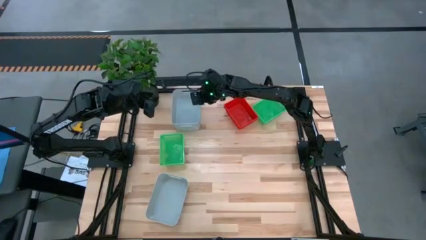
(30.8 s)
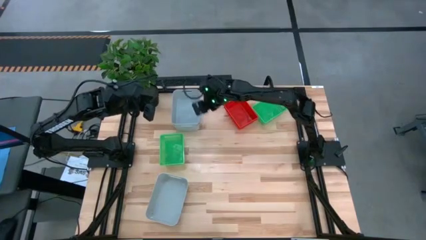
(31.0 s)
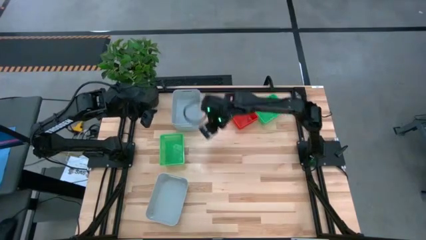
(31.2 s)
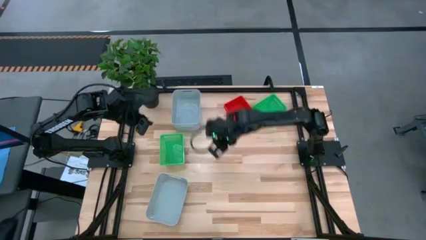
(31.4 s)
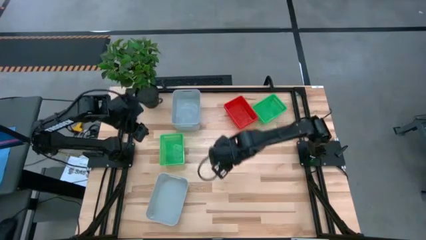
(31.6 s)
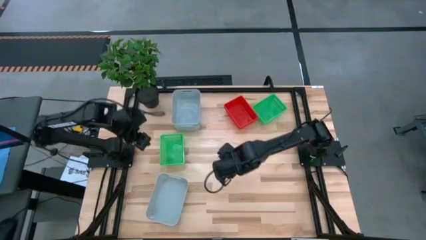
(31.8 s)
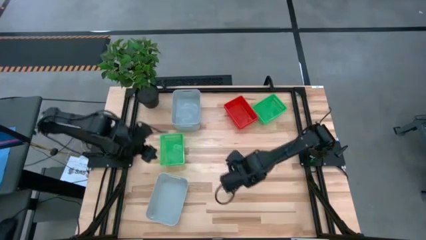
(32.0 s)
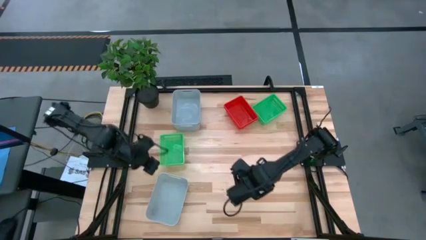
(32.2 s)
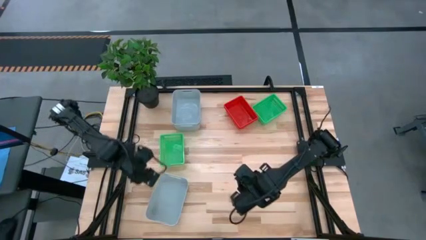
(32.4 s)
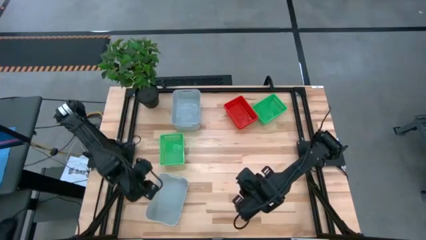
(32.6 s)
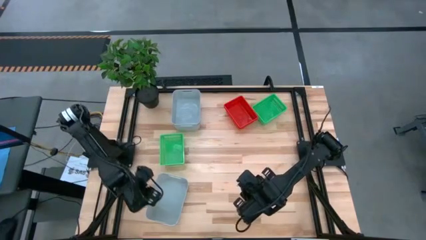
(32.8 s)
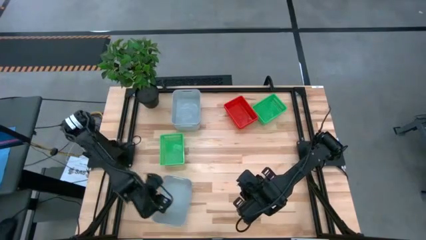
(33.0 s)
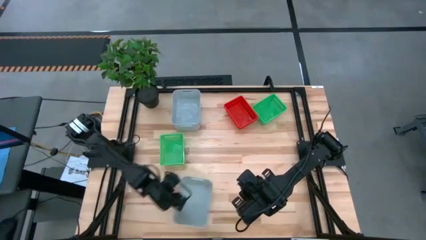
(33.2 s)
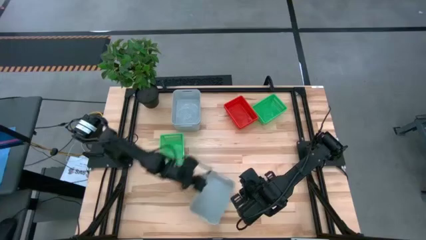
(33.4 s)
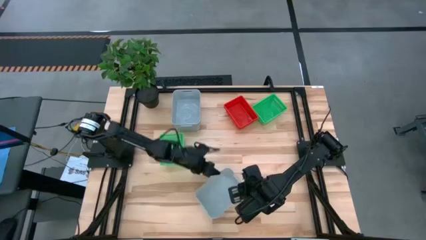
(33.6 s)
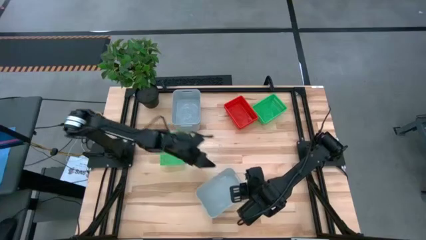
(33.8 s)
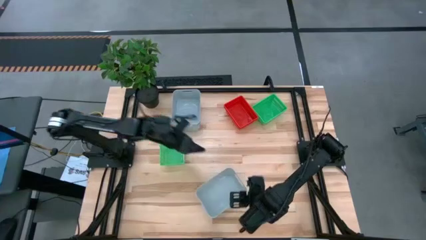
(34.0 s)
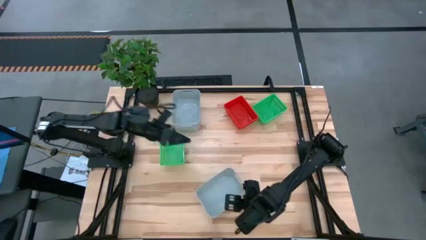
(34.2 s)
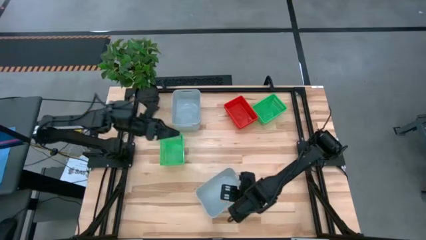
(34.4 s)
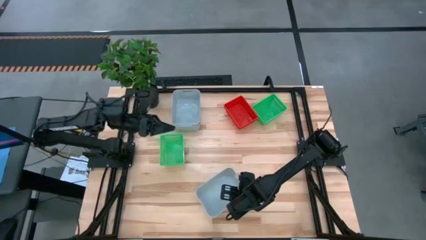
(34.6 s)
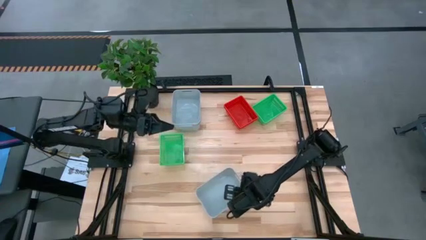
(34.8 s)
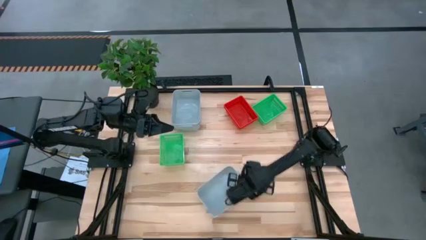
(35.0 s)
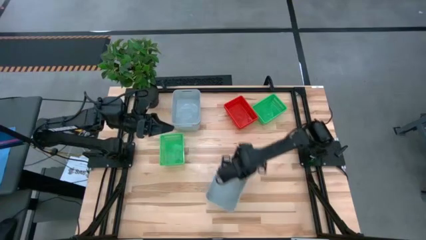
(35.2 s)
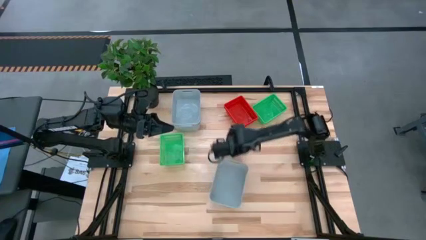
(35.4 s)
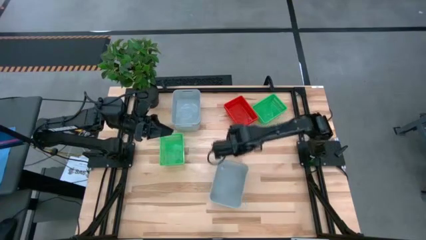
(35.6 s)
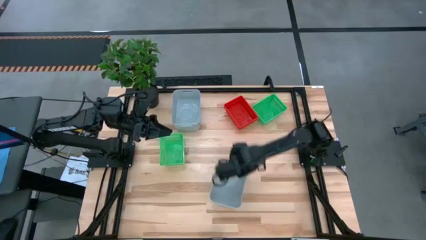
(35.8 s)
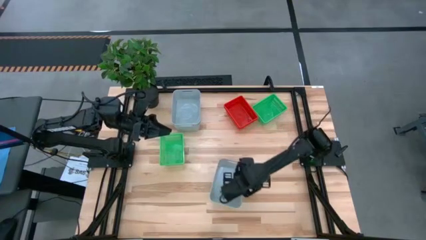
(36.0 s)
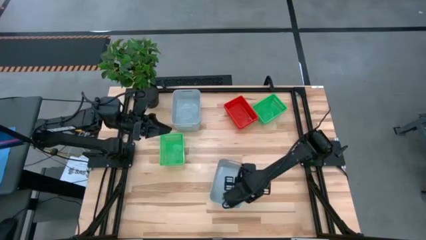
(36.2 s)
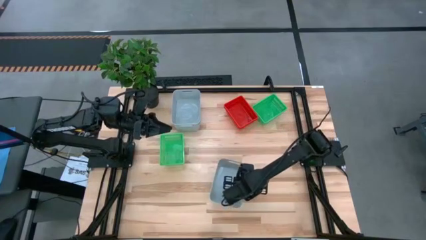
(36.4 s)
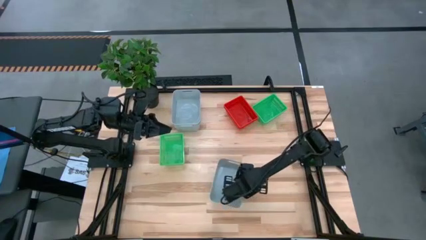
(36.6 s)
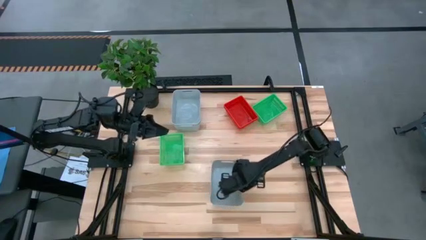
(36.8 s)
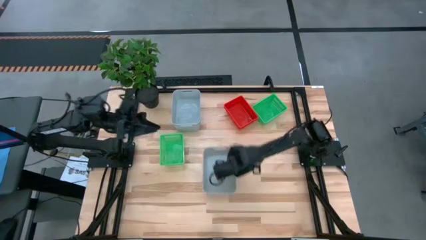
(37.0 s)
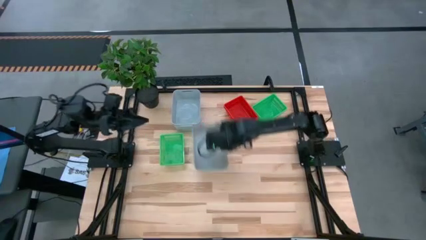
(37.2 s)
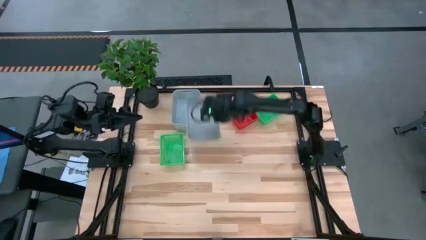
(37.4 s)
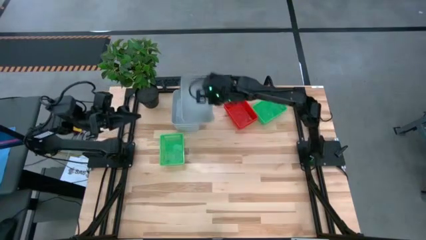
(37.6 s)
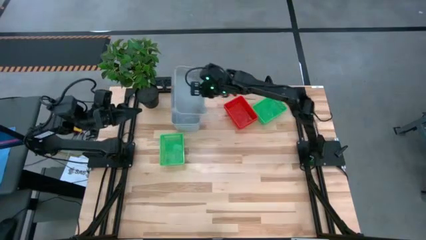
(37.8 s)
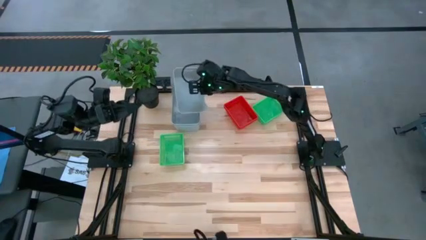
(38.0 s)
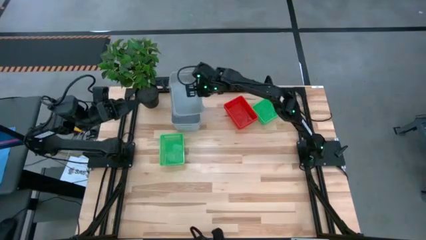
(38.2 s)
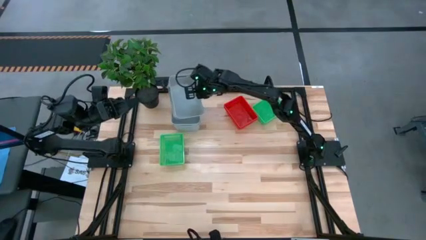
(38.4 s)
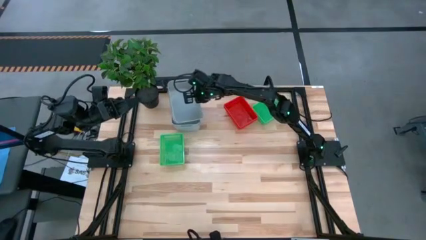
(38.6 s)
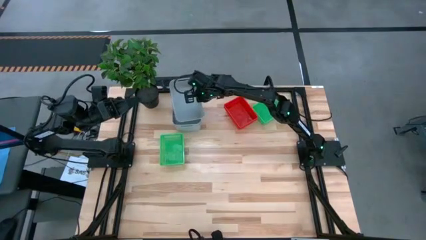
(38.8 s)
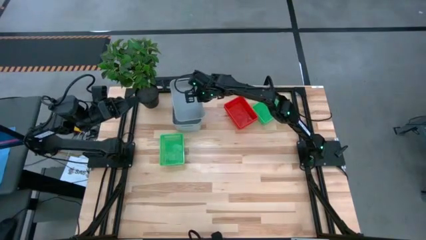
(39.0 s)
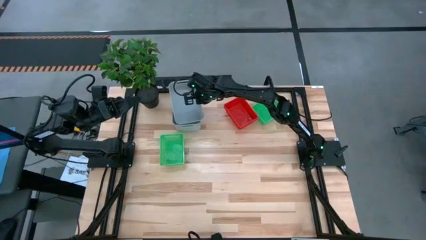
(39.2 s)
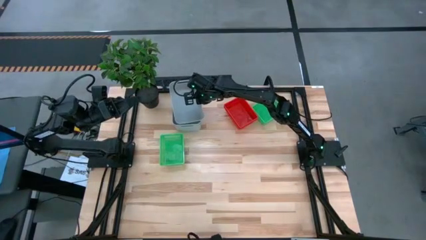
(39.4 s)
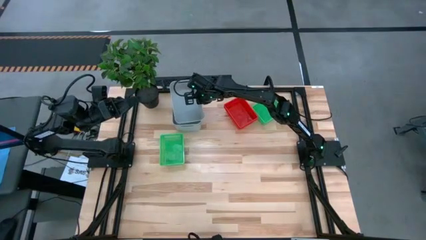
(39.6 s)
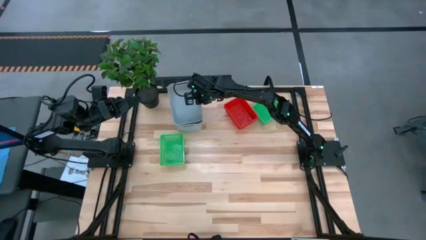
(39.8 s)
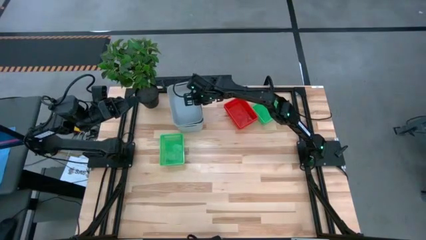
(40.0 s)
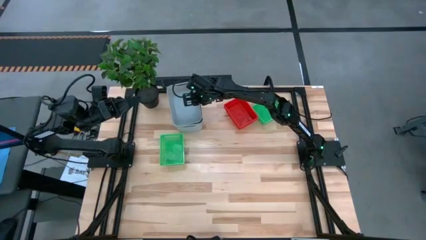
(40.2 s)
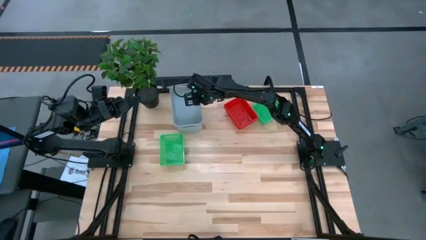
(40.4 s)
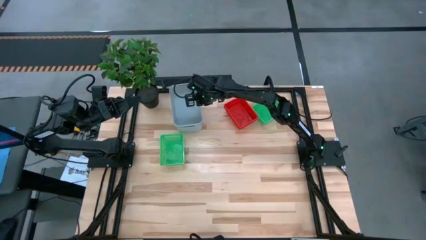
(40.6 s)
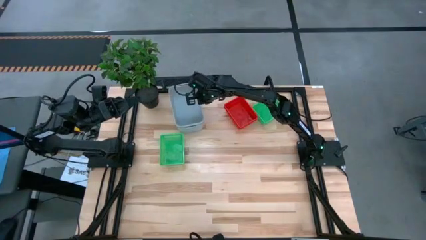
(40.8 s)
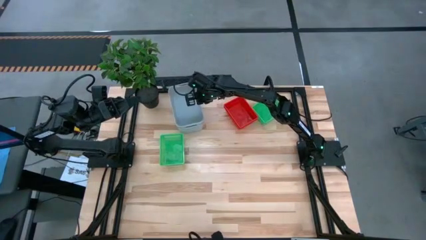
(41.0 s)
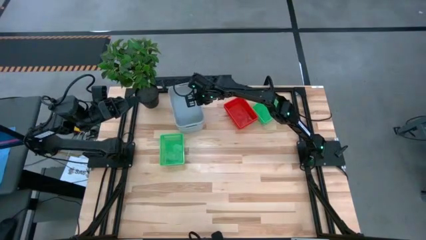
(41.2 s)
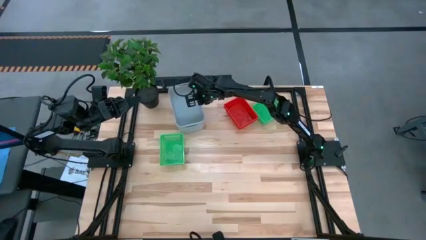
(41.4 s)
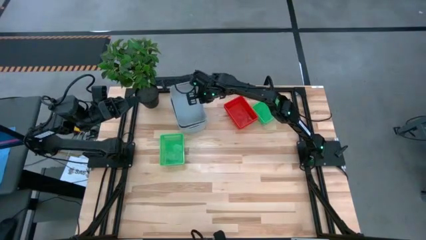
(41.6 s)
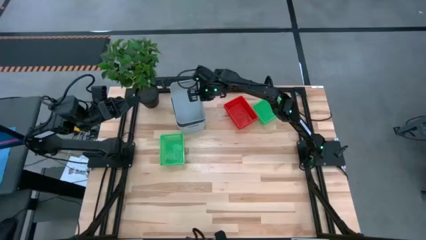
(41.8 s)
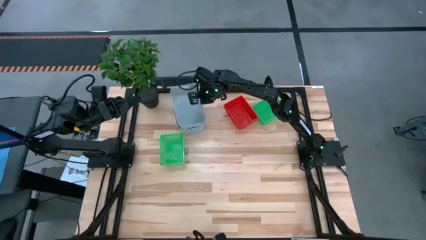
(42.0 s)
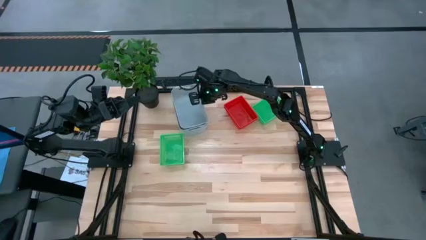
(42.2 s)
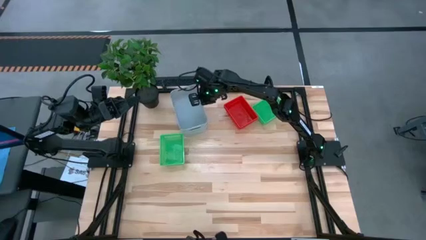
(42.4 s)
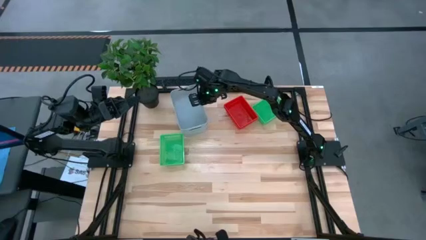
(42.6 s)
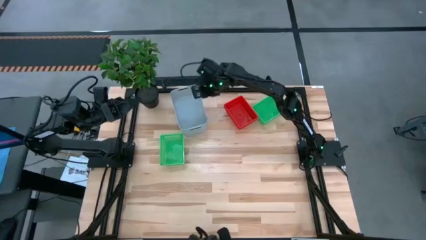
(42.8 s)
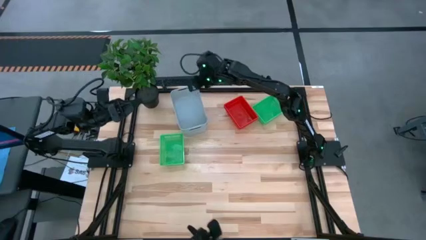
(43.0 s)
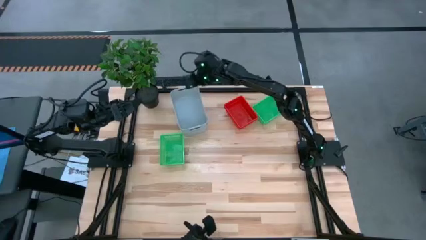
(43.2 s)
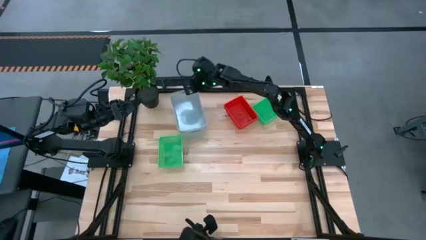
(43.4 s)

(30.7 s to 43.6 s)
Stack the bottom gray bin on the gray bins

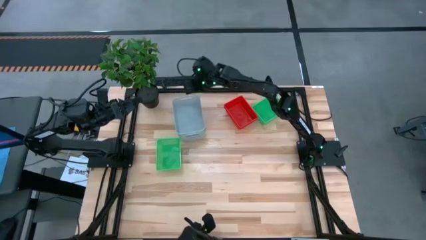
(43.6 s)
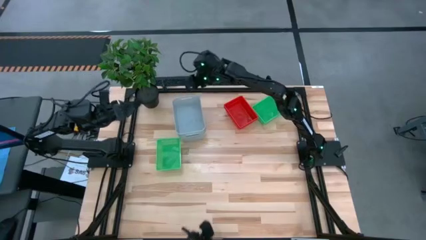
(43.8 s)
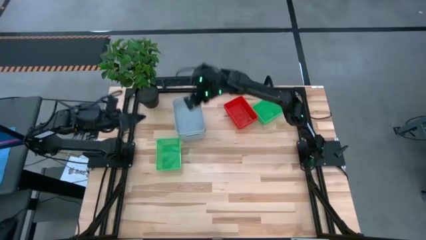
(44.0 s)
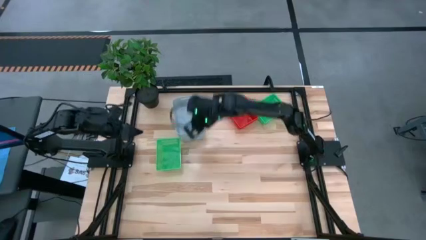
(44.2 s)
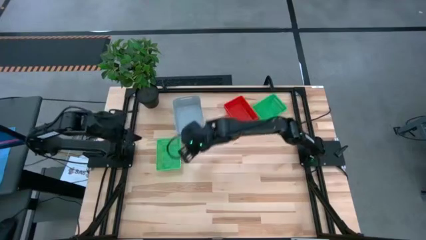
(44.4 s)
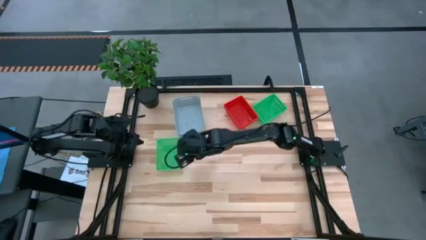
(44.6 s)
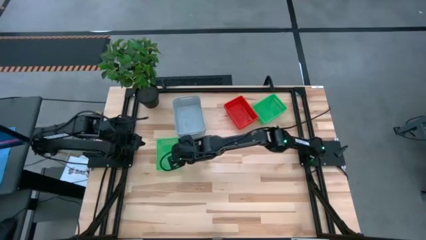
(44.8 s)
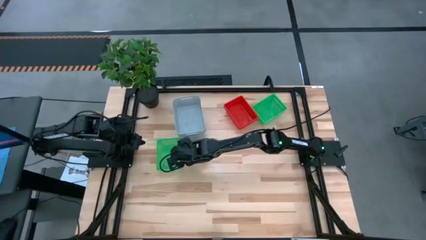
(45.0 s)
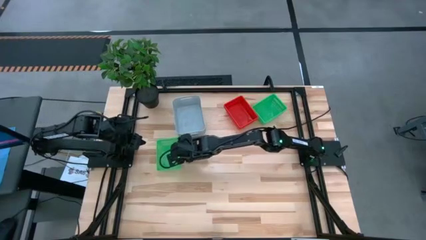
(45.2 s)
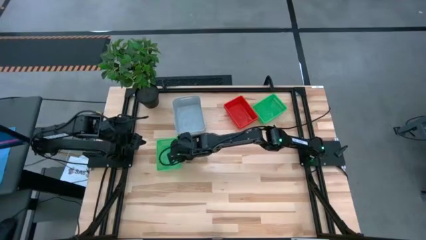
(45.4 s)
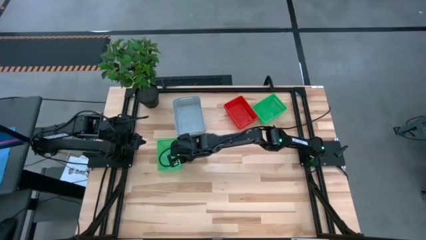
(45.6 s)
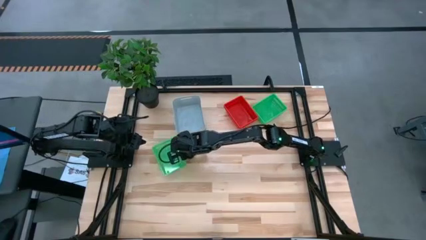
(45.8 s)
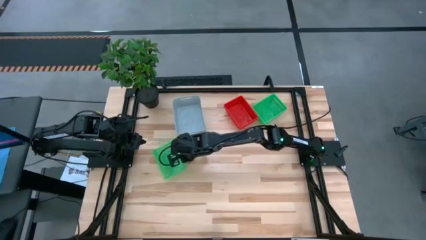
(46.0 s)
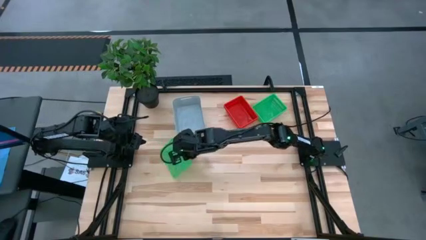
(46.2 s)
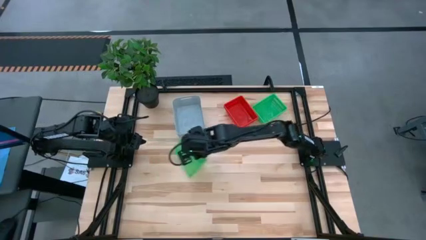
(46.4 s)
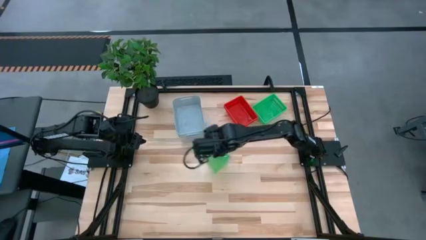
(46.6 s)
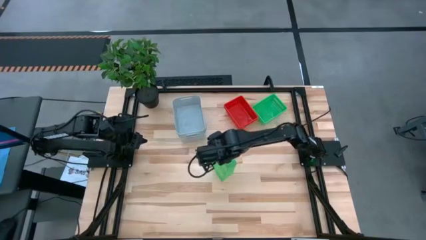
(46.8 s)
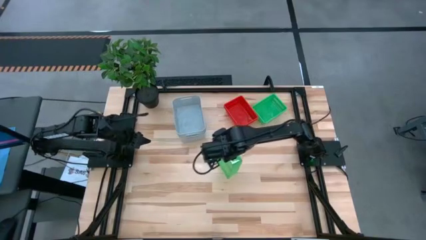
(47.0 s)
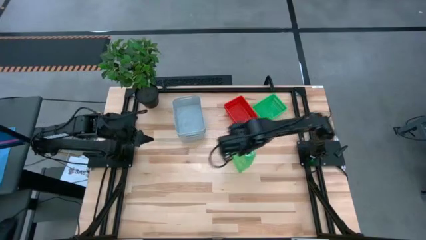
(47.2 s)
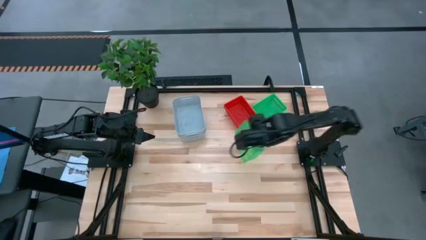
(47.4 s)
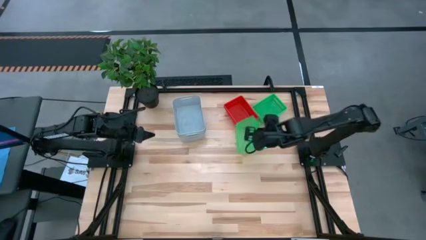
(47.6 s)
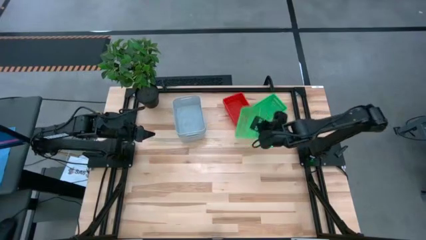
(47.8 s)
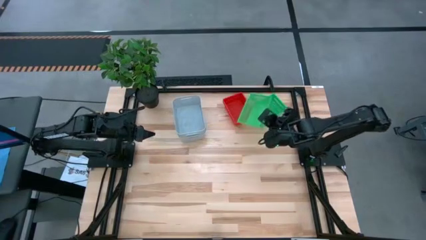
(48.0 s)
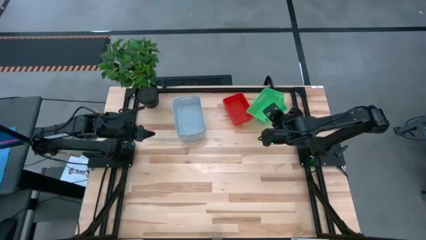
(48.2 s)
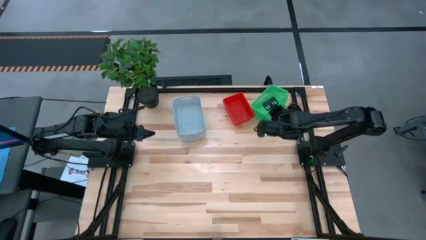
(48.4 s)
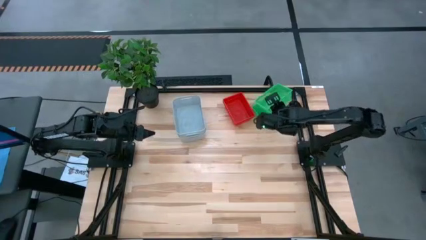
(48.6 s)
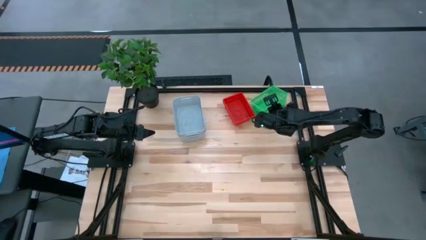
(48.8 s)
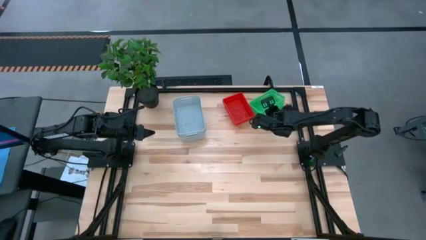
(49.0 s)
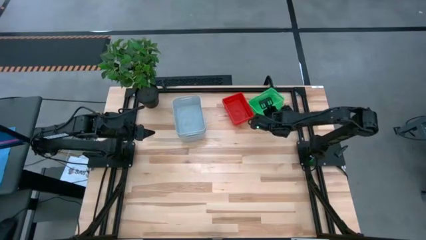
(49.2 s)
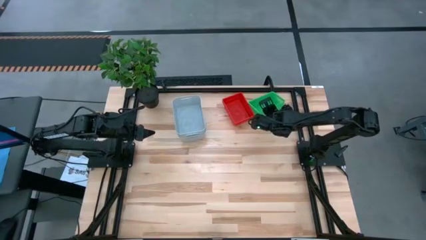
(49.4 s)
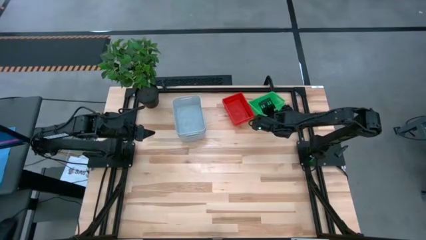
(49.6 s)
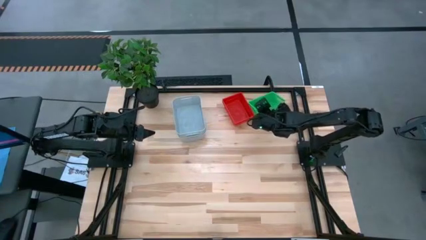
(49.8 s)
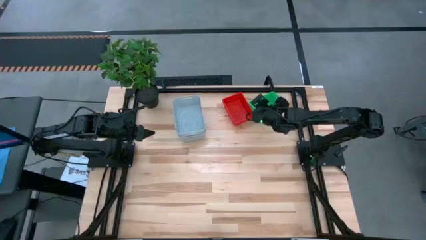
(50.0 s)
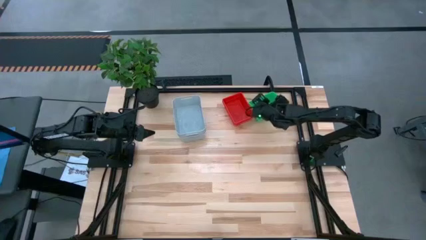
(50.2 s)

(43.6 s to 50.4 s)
Stack the left green bin on the green bins
